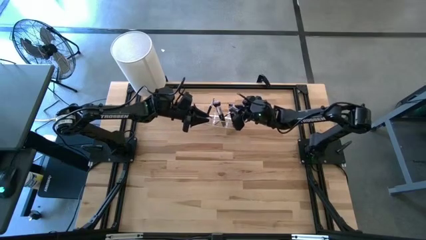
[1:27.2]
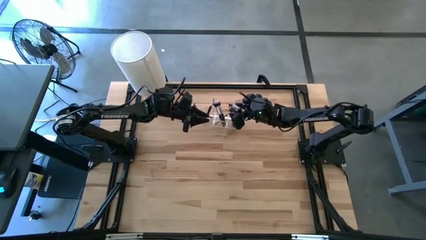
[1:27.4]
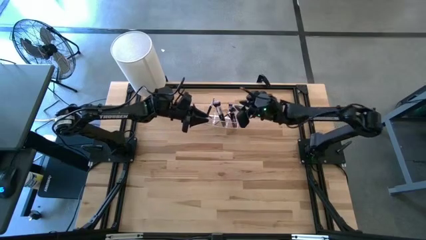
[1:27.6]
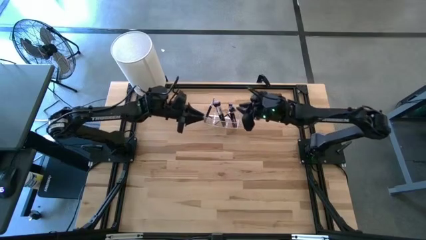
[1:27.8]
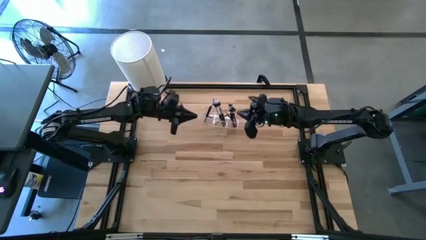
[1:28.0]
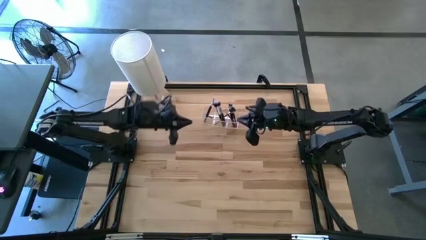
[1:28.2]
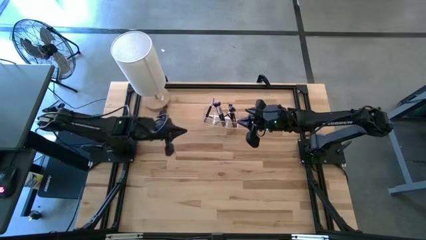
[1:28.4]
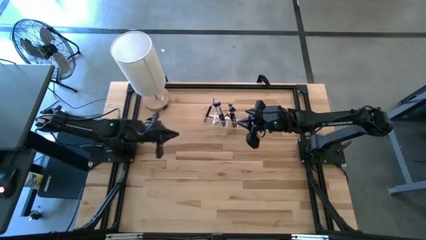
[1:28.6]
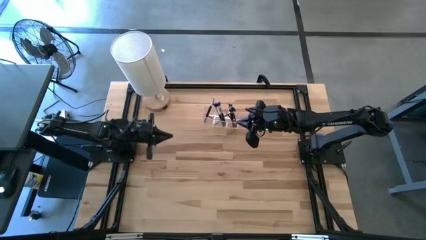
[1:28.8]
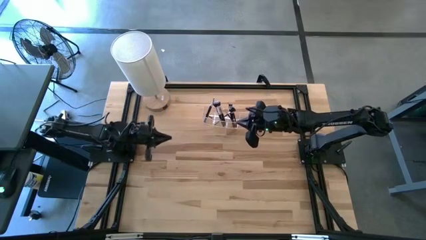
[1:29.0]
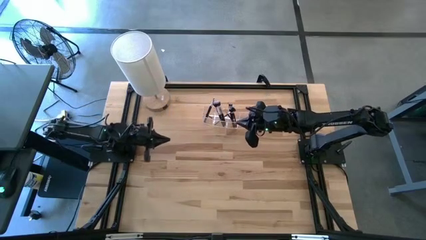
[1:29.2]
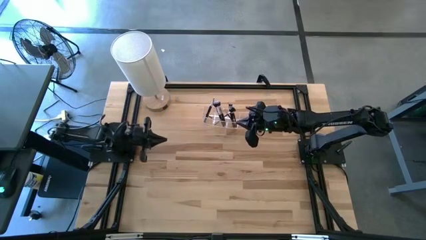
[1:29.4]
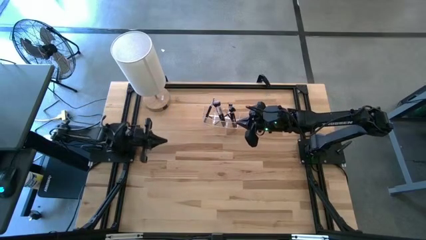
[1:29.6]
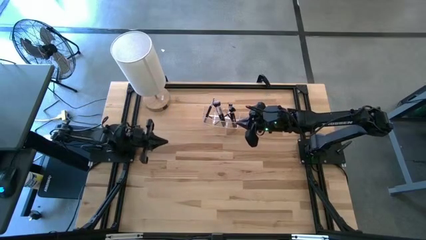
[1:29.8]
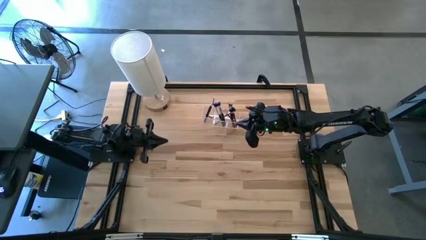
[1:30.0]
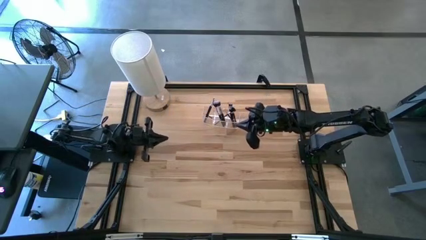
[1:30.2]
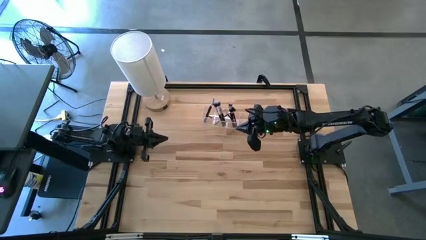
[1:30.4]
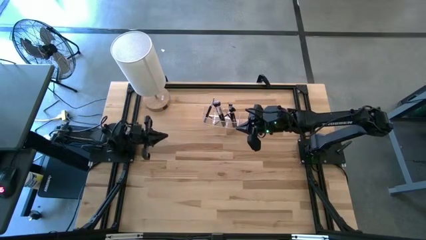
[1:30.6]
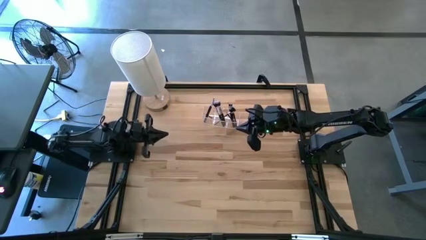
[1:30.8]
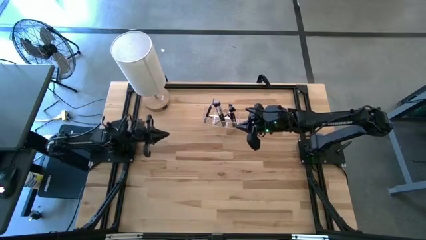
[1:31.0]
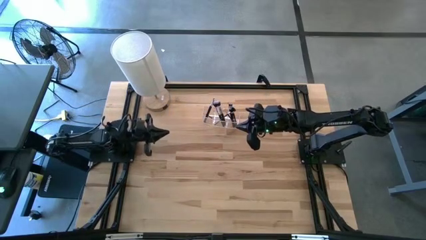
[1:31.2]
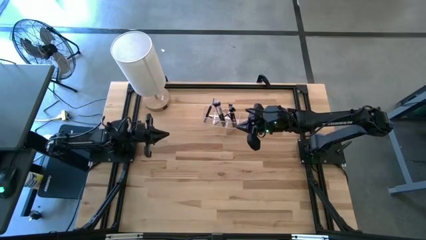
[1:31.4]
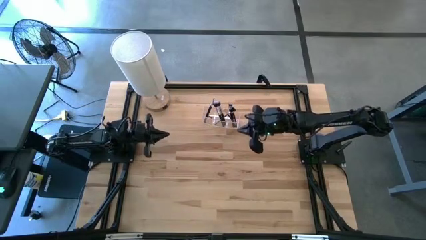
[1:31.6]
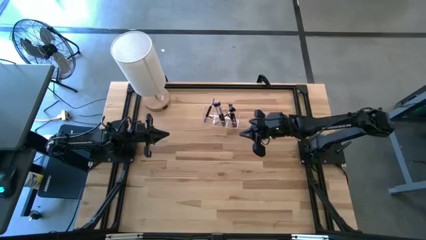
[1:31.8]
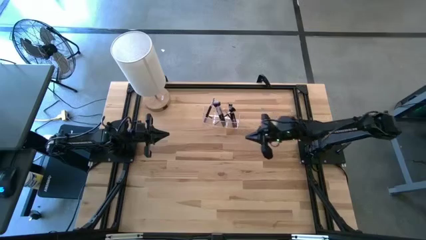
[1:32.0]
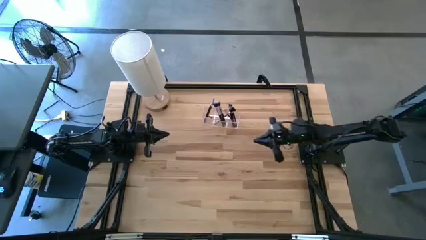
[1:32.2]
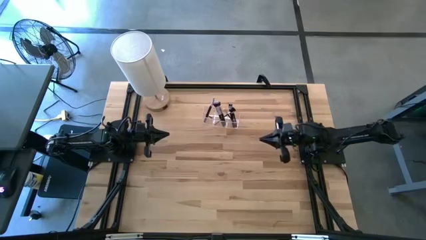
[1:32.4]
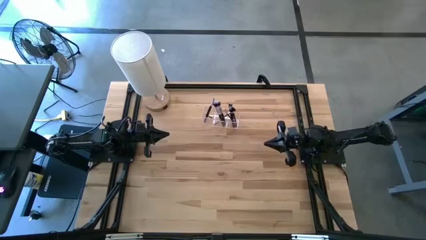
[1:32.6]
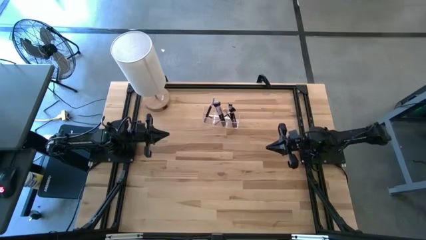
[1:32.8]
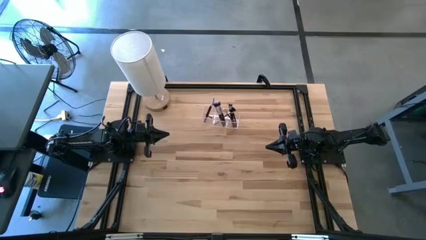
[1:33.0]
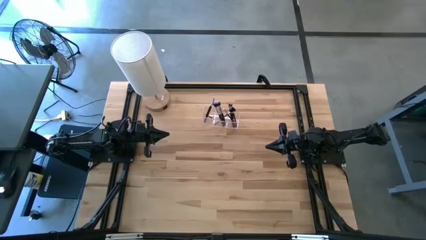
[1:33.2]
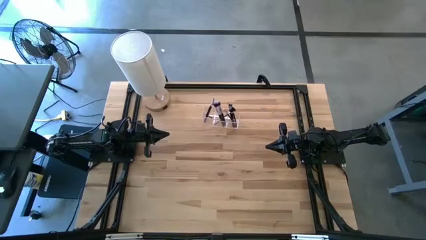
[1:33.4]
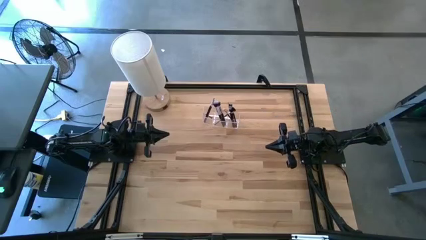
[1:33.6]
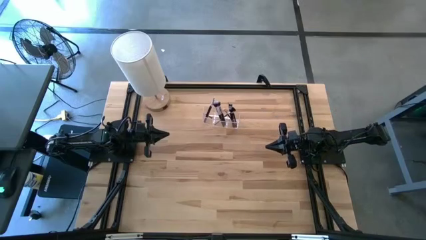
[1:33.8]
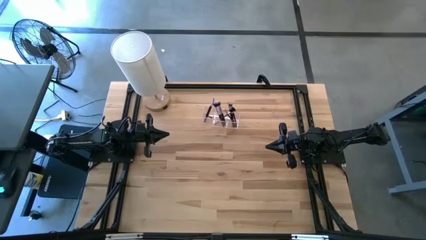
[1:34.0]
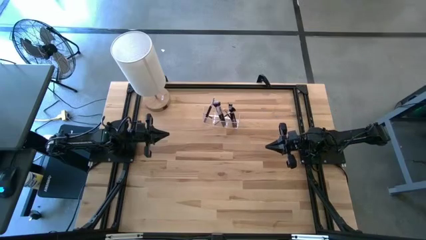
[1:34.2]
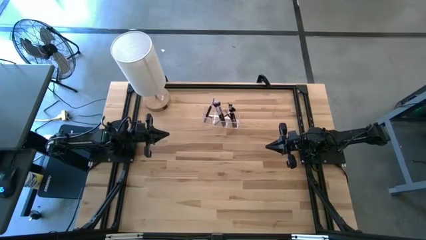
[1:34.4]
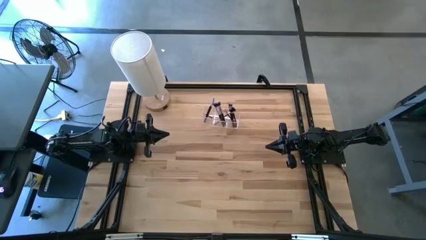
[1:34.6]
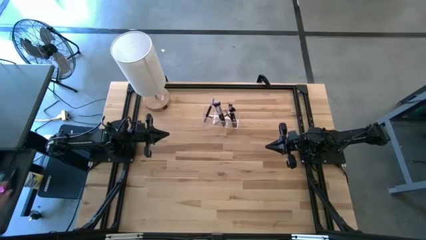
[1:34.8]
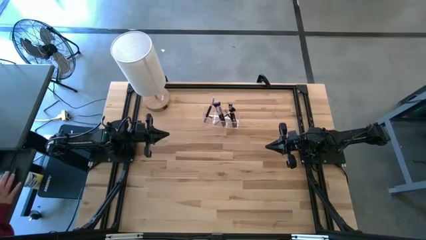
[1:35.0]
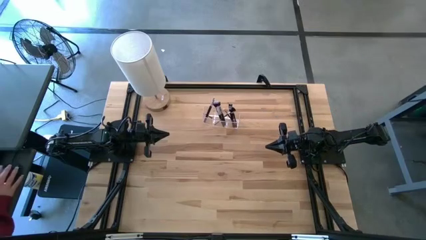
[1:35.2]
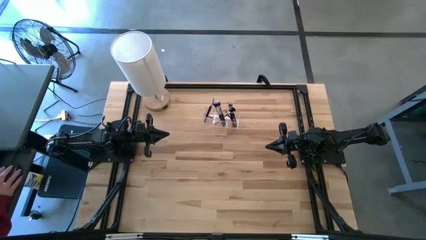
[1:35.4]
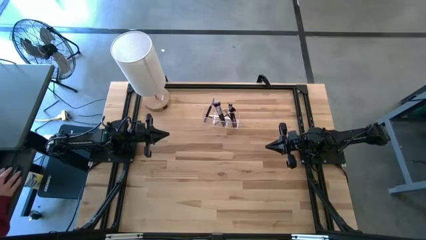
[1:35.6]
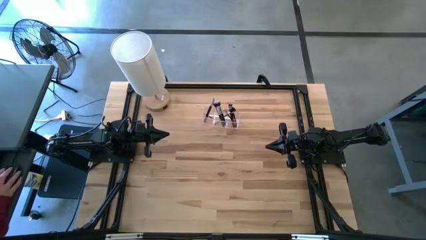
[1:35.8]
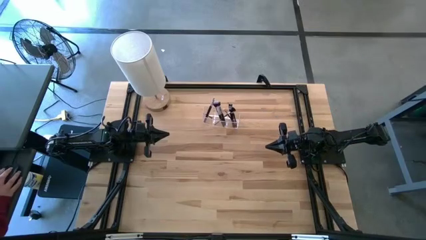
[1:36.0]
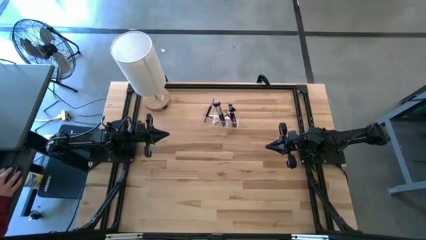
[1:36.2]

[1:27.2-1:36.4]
Task: Put items in baskets/containers
Return to Home Position

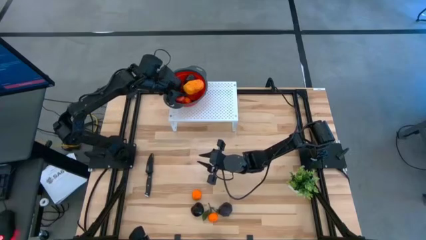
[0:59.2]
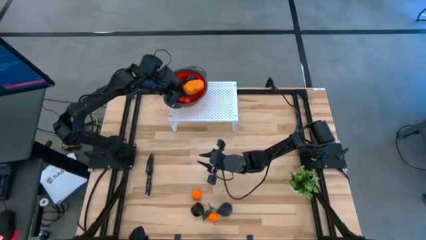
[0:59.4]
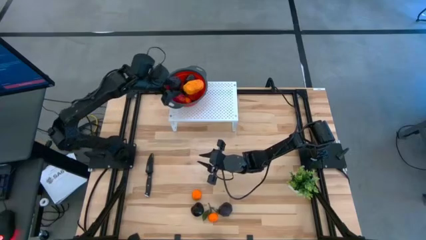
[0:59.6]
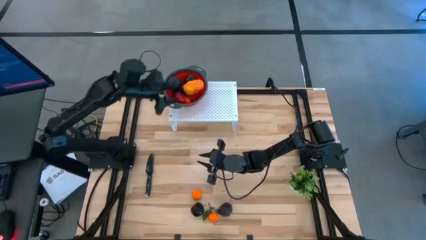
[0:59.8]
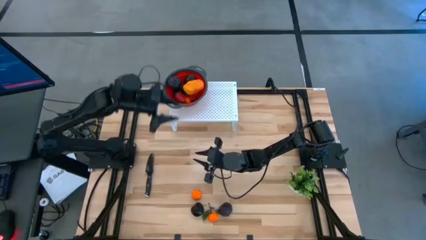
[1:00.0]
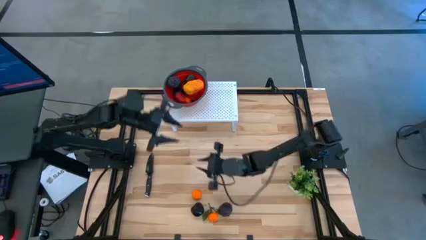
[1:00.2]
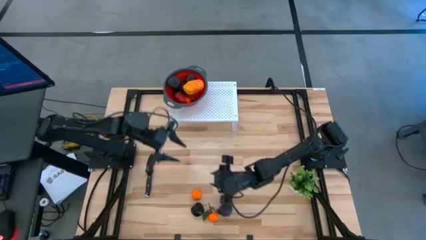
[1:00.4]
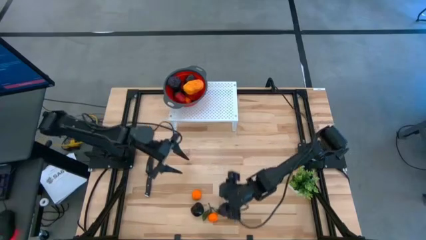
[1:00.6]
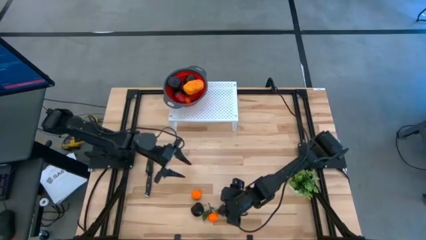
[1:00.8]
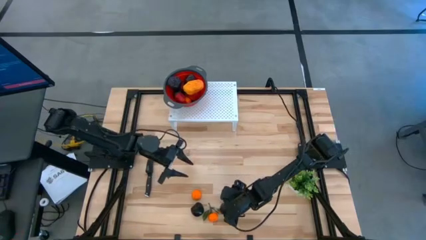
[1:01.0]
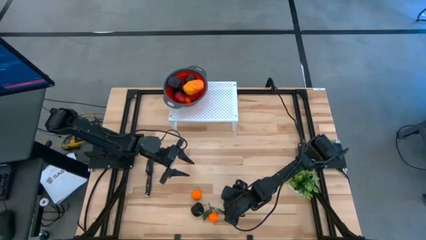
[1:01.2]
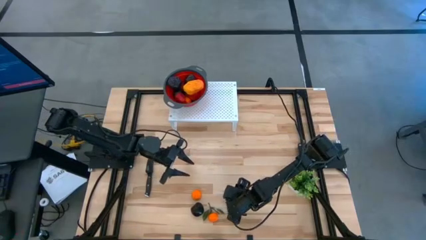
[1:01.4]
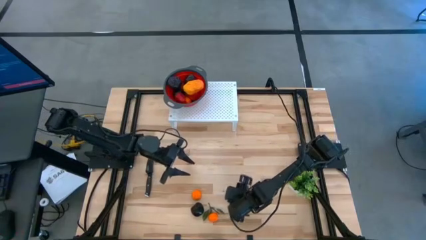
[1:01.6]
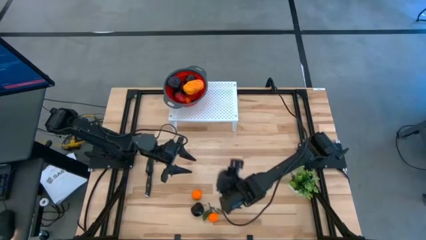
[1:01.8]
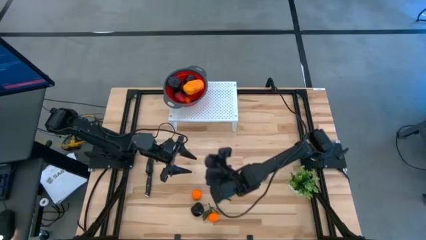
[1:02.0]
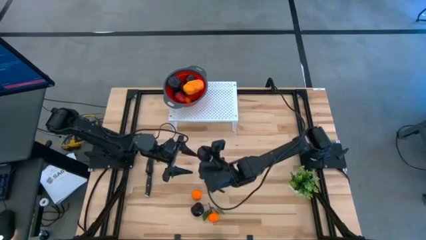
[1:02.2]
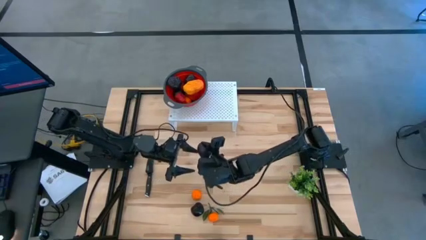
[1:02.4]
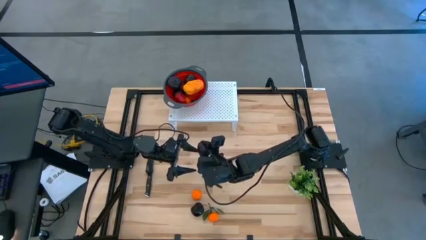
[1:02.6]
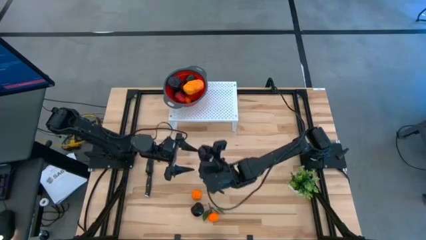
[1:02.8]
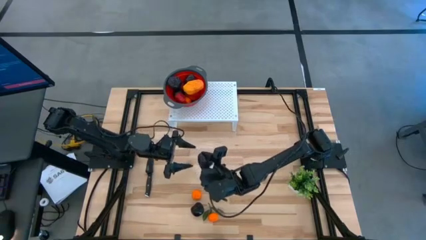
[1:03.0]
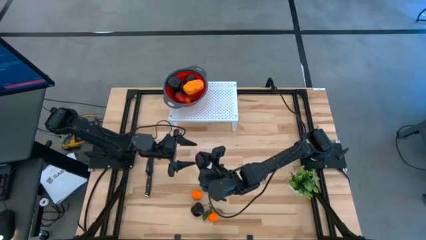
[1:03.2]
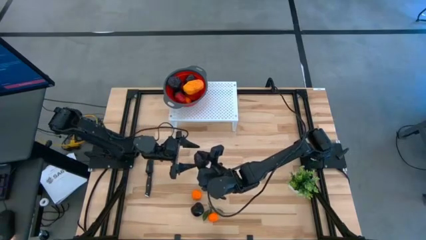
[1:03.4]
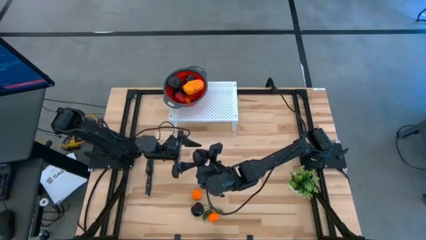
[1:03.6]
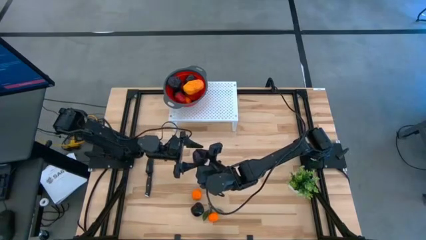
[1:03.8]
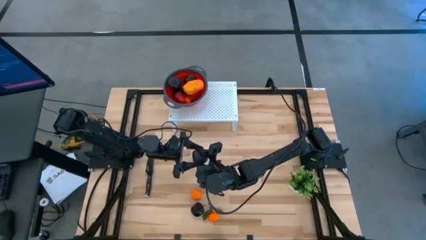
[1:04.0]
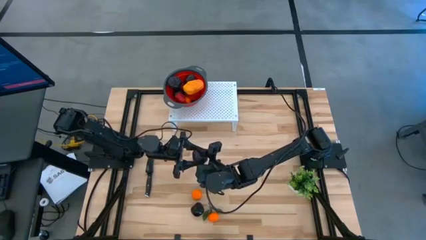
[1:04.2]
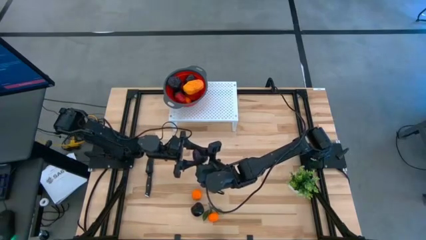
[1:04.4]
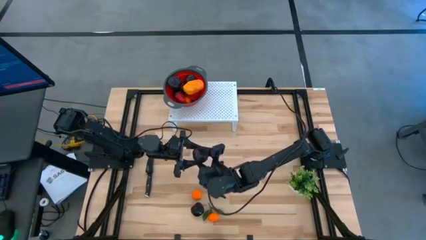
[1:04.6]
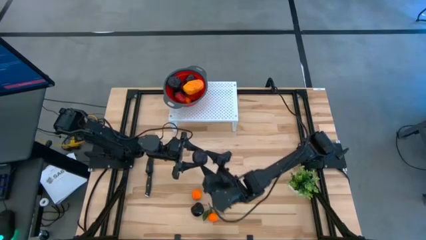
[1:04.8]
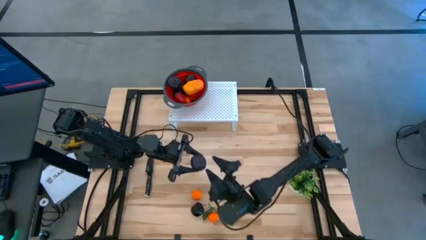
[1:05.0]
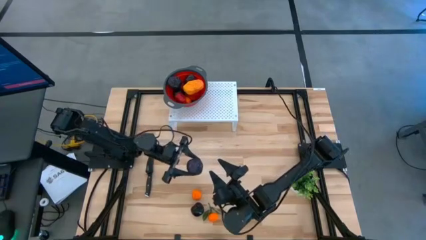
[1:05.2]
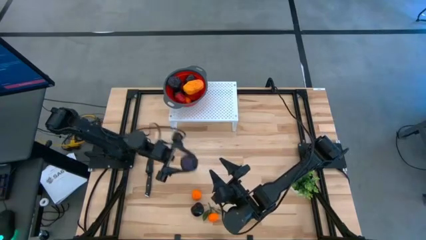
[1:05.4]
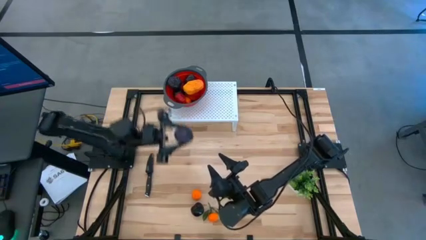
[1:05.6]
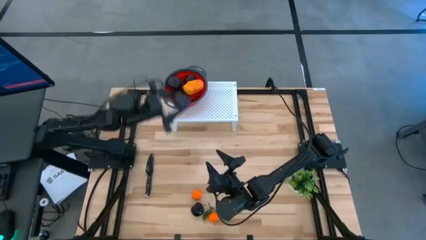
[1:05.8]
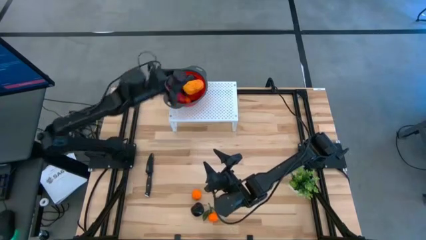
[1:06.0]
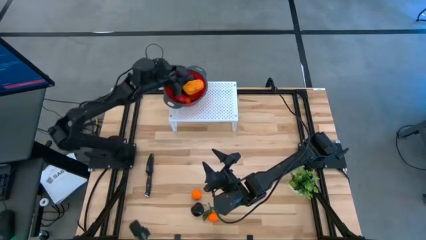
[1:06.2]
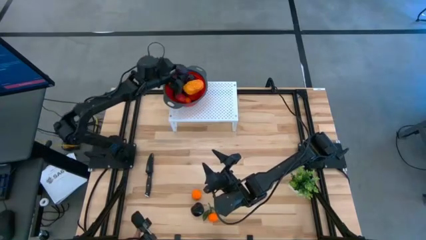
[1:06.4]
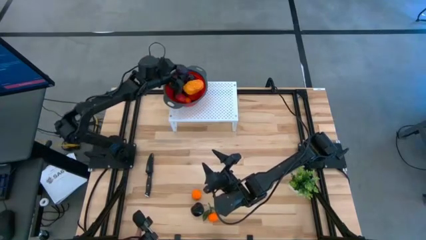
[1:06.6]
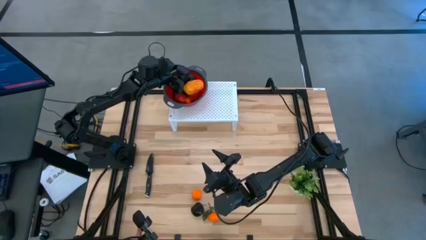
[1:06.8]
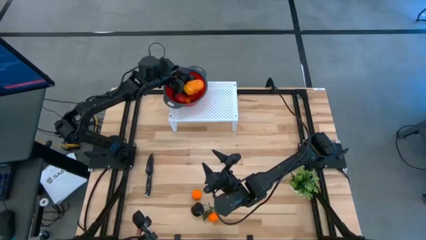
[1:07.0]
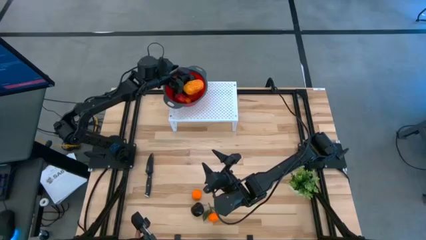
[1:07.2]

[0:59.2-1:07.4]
Task: Pick & Place Fruit
Put the plum into the basket
